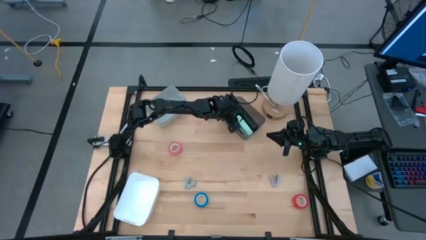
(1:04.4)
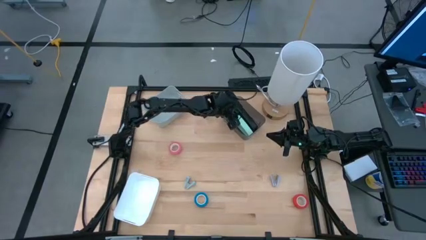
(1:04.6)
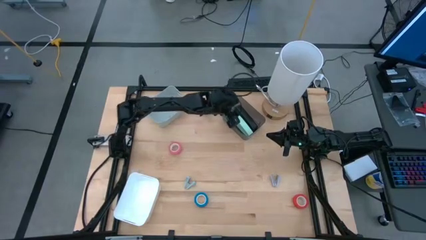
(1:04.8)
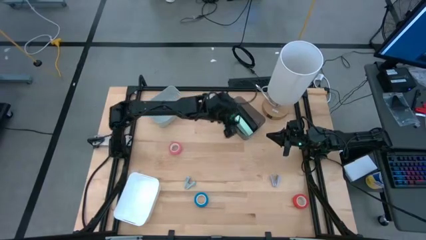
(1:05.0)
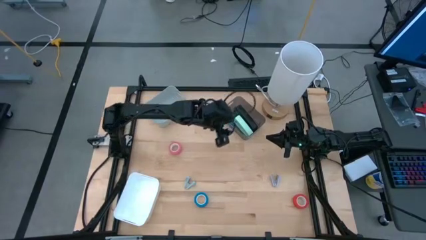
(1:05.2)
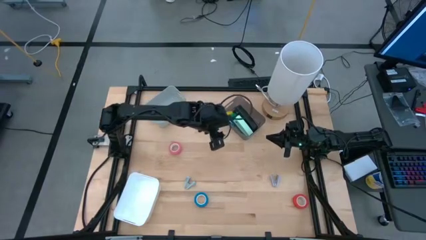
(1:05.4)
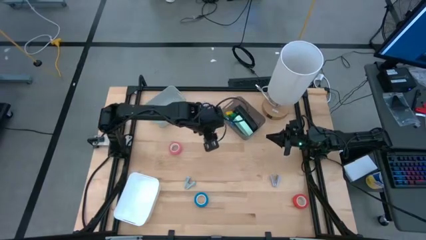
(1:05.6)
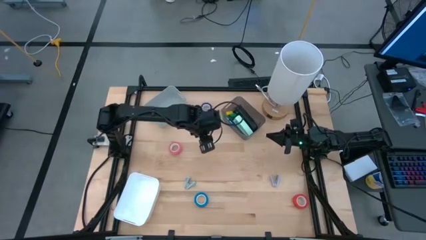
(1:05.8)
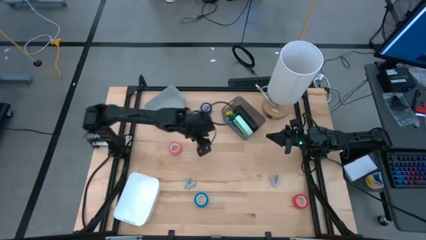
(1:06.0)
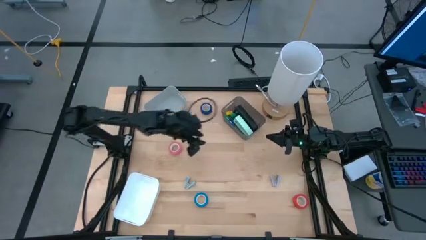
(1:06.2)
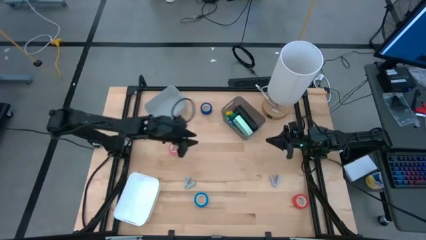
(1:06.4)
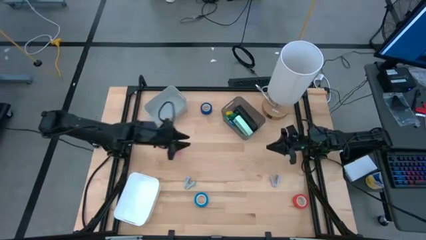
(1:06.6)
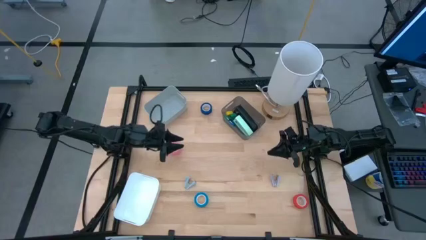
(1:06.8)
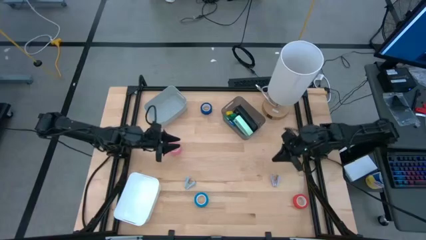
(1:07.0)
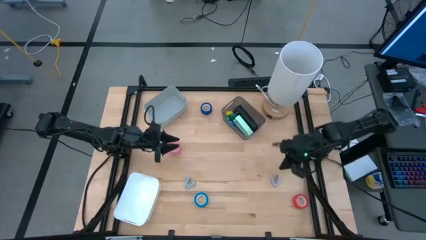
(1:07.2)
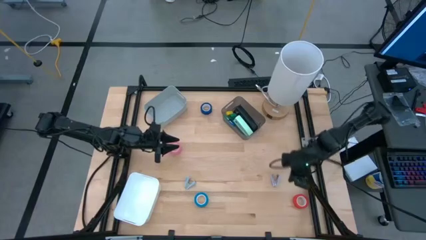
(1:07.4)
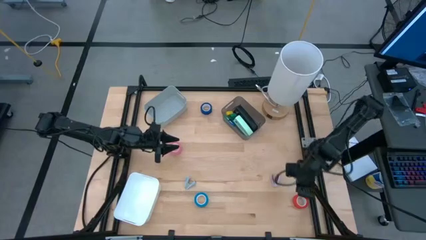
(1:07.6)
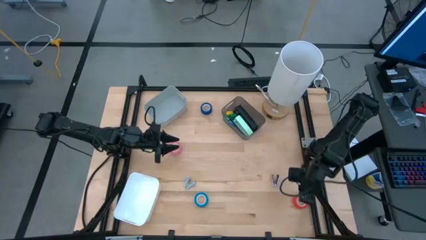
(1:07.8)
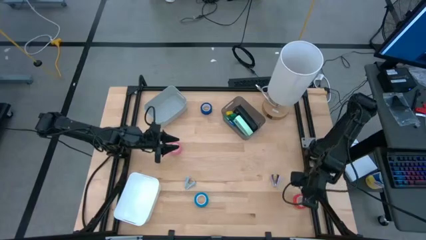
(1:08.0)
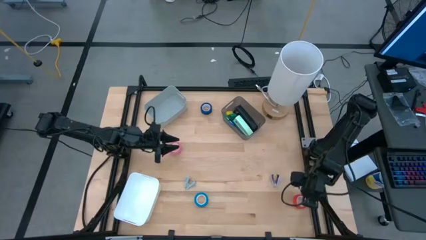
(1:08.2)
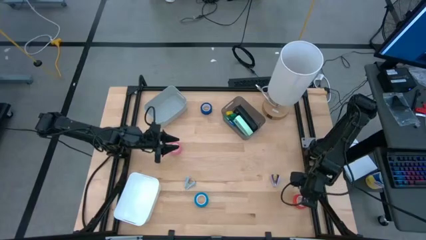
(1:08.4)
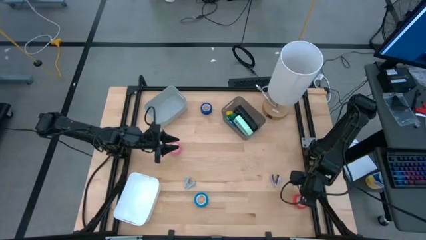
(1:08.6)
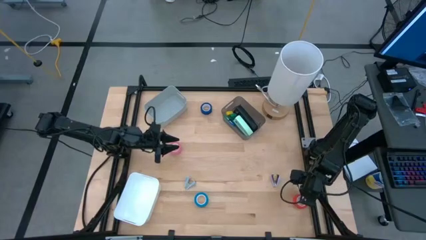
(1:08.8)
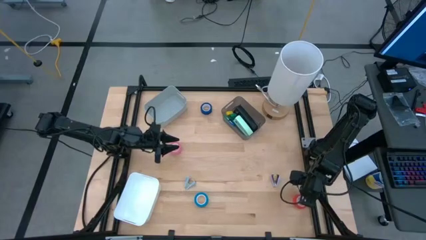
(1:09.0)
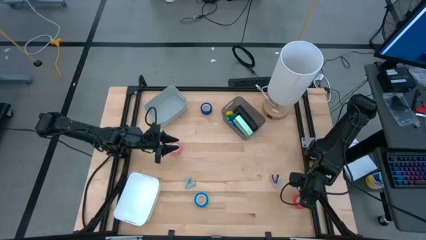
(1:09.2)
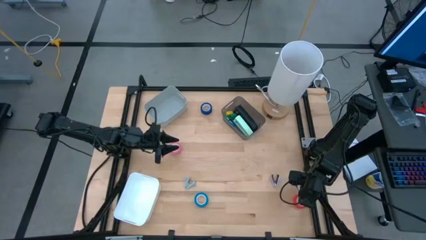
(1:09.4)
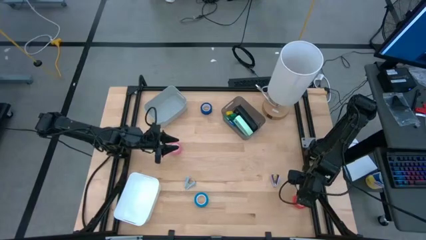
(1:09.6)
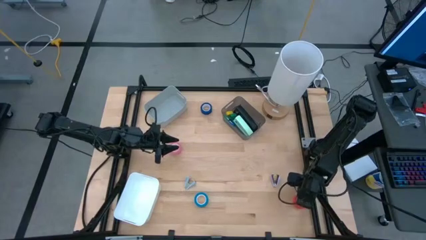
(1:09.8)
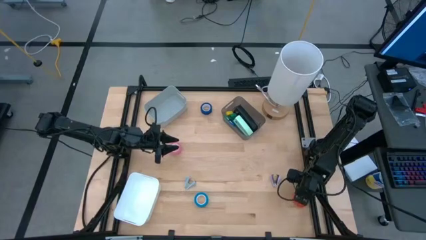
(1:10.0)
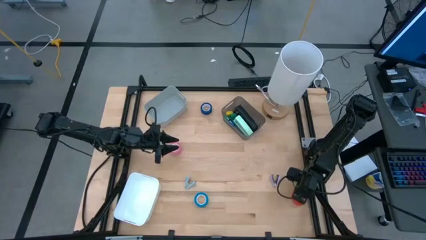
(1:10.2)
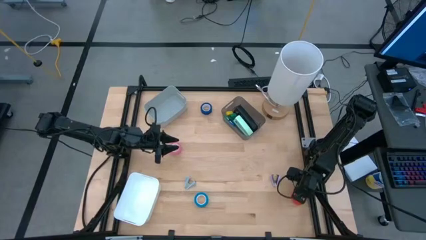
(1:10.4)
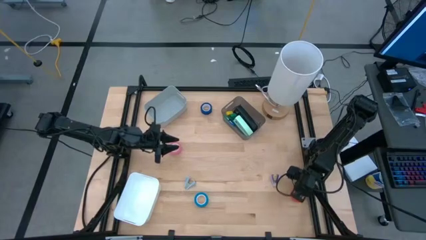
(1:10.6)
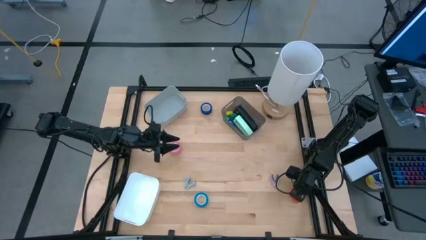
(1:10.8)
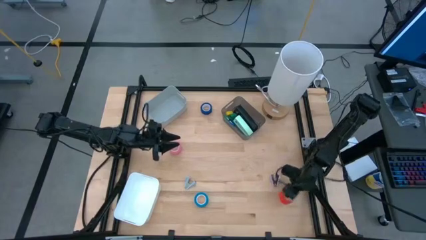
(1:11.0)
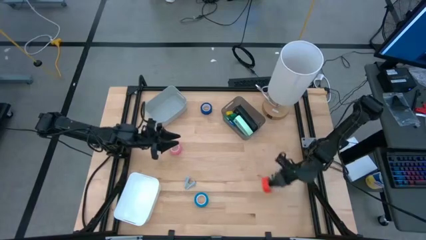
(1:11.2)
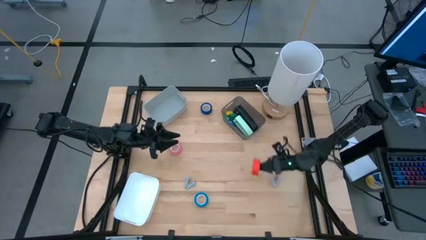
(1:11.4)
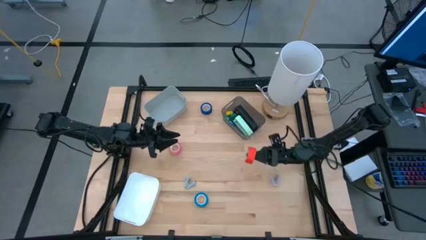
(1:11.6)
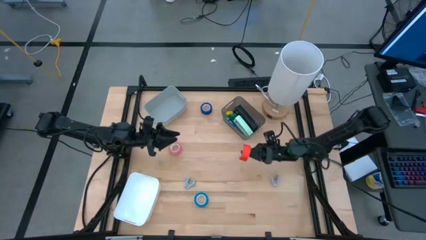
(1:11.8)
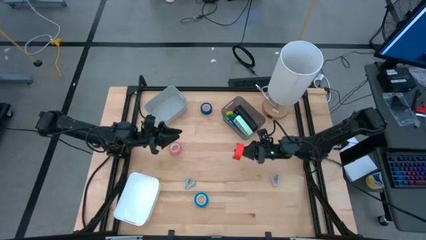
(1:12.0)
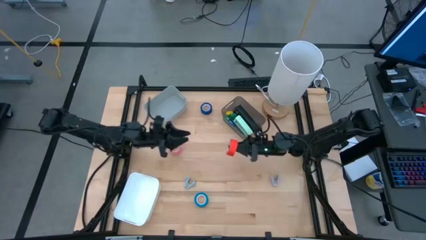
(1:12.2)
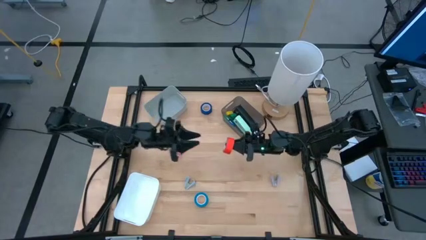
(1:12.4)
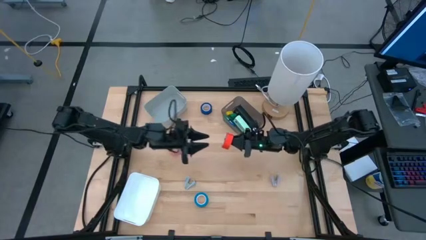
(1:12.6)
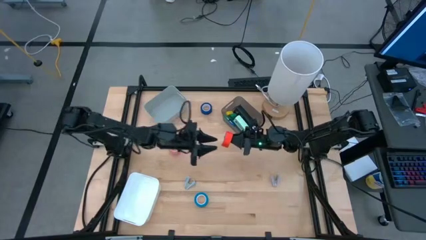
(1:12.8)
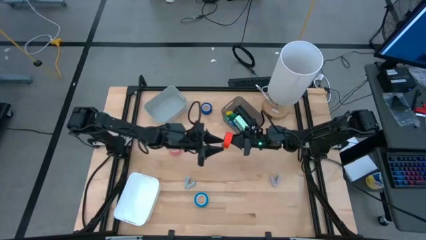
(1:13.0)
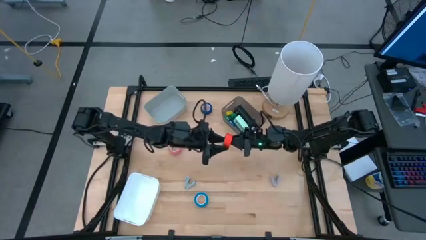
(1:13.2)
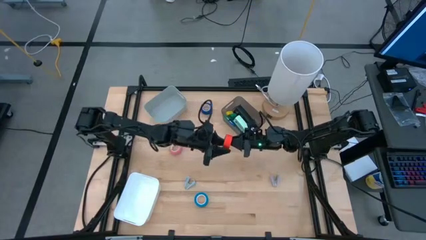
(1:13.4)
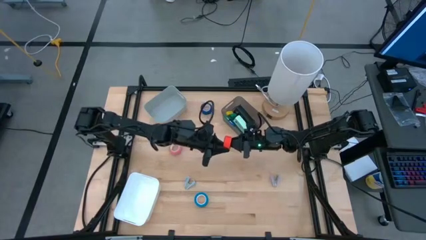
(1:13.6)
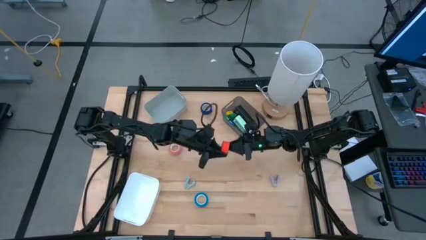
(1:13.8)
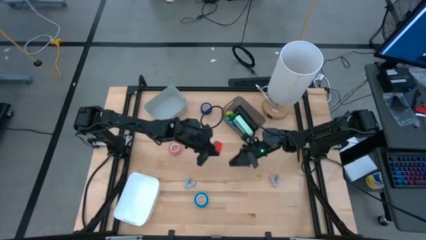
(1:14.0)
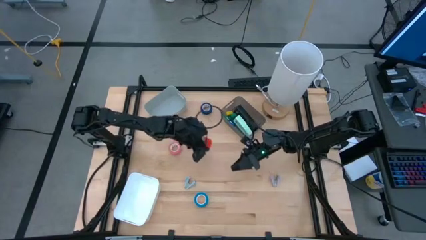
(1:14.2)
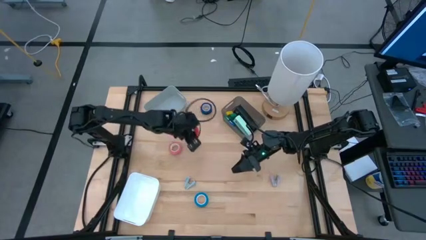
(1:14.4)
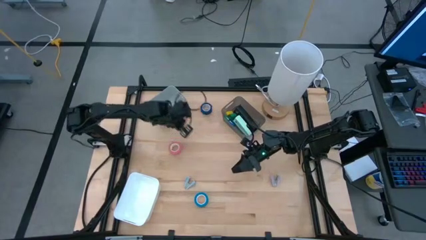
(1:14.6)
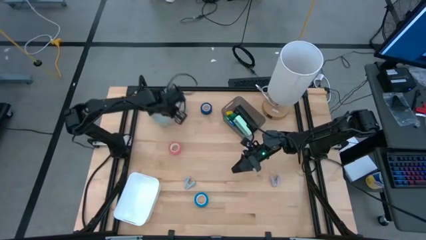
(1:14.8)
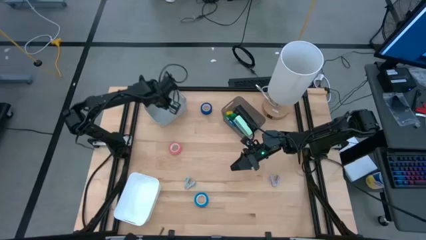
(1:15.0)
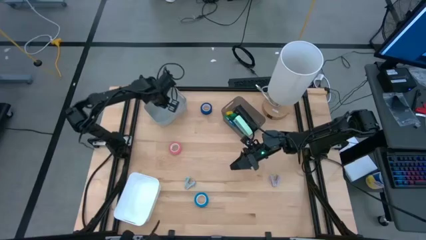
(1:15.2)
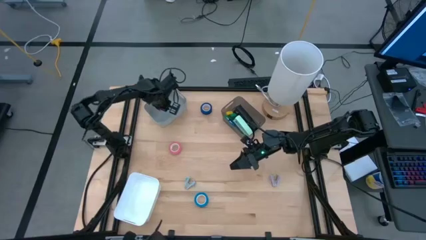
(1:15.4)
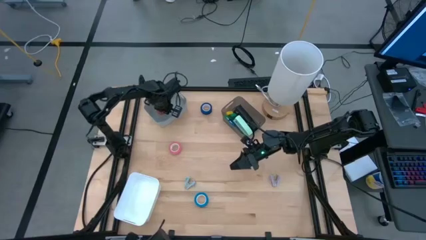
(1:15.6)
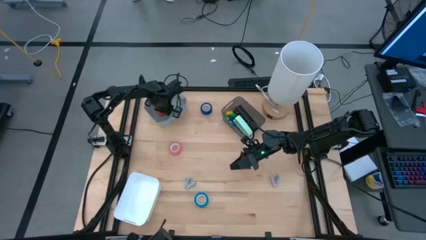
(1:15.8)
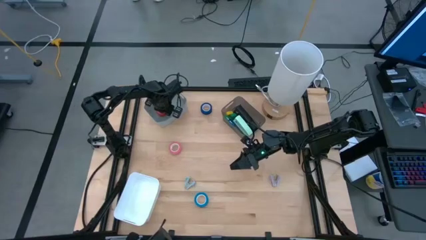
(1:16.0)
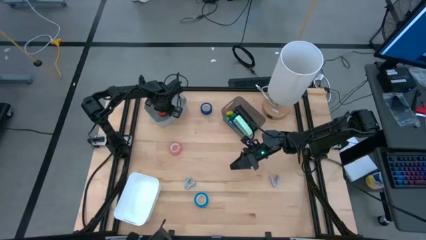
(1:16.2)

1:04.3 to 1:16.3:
Task: Pick and place Stapler, Stapler remover, tape
Put the orange tape into the gray bin

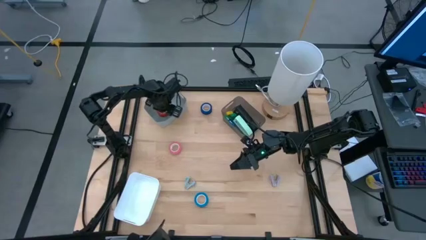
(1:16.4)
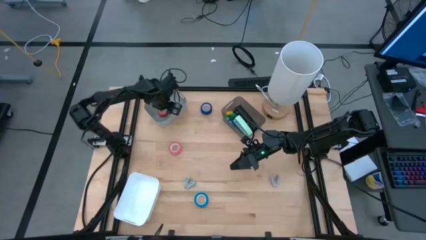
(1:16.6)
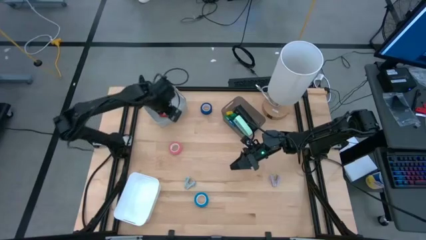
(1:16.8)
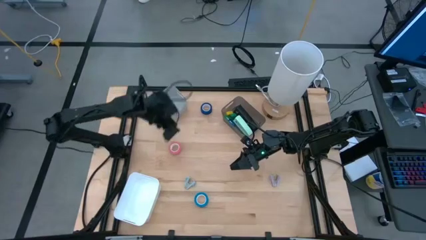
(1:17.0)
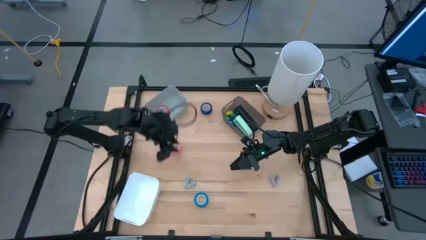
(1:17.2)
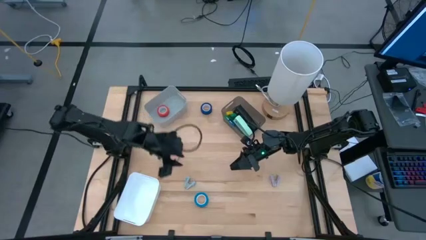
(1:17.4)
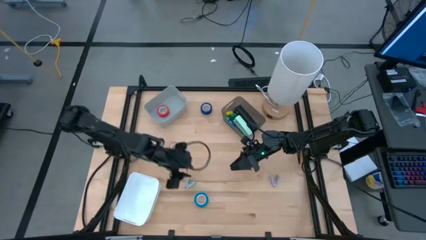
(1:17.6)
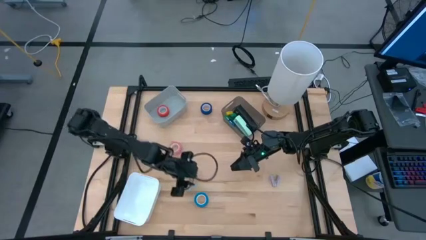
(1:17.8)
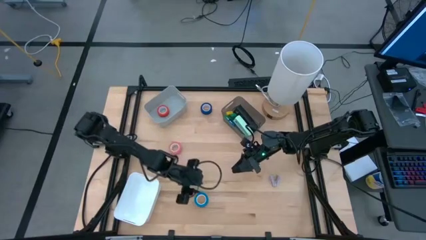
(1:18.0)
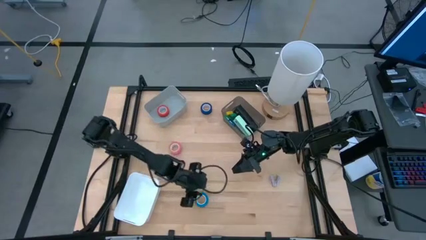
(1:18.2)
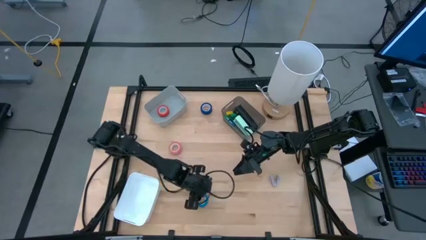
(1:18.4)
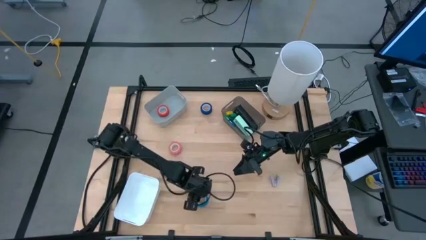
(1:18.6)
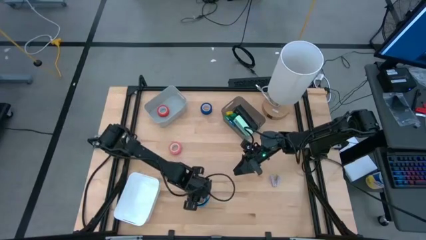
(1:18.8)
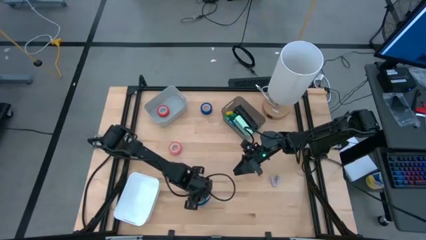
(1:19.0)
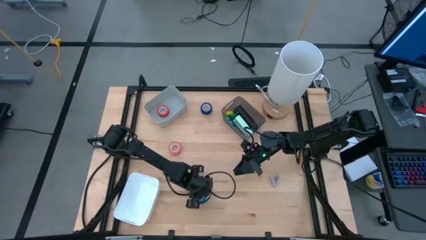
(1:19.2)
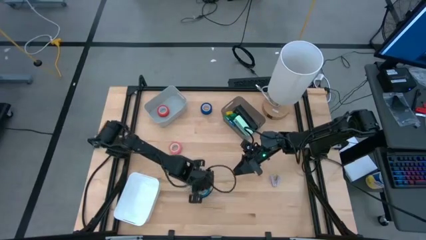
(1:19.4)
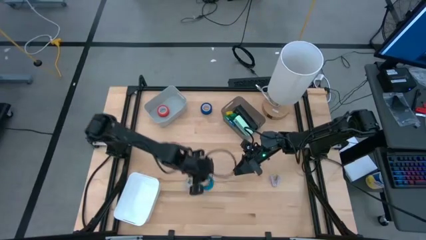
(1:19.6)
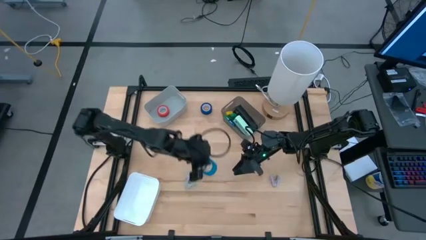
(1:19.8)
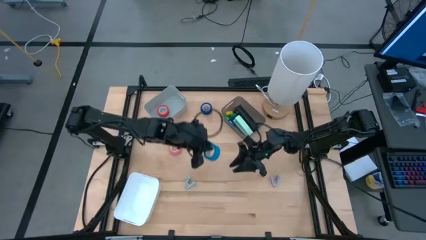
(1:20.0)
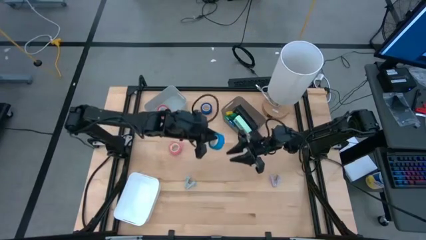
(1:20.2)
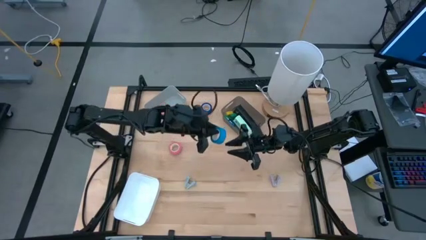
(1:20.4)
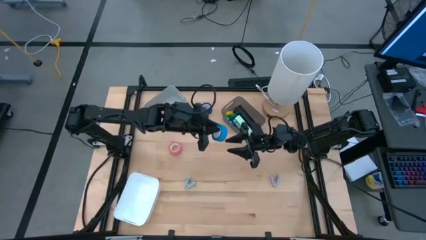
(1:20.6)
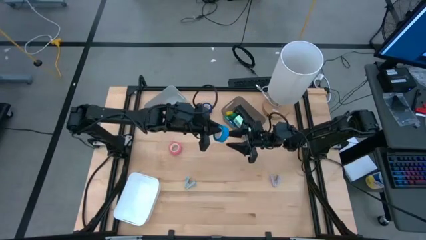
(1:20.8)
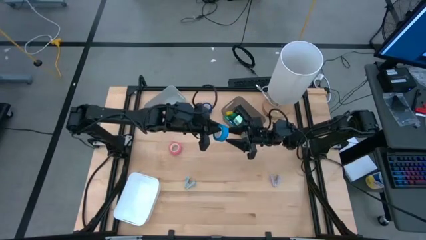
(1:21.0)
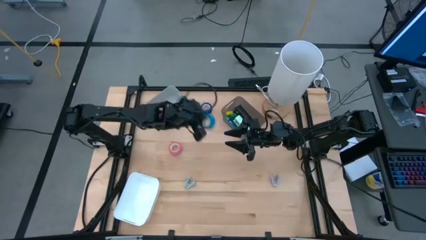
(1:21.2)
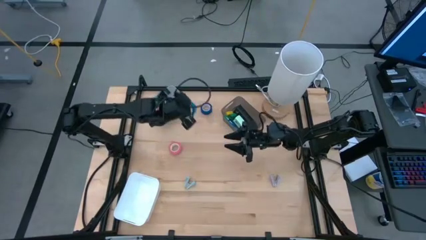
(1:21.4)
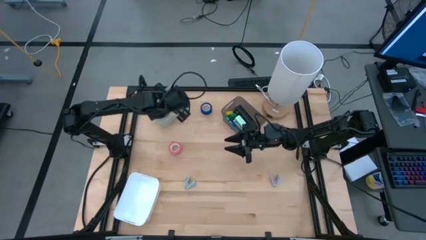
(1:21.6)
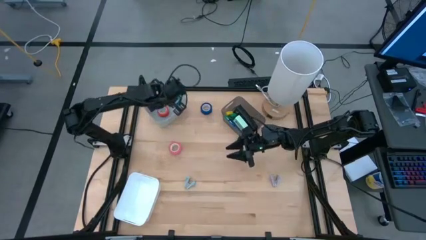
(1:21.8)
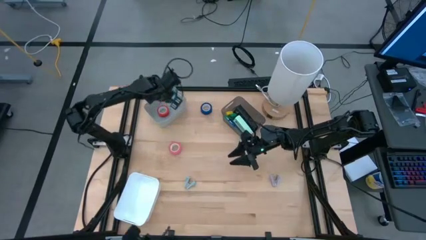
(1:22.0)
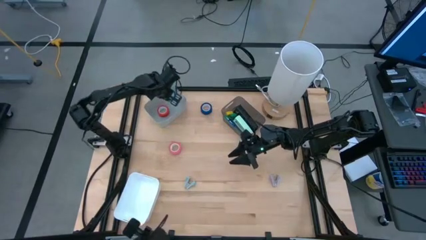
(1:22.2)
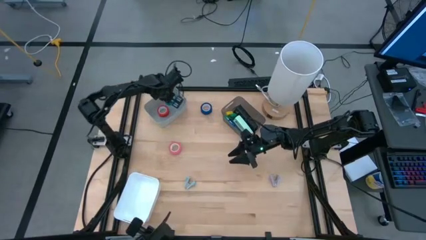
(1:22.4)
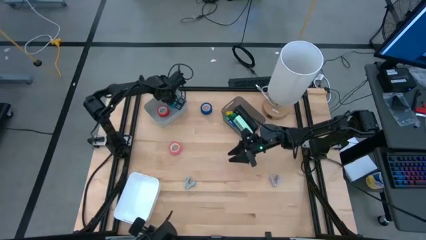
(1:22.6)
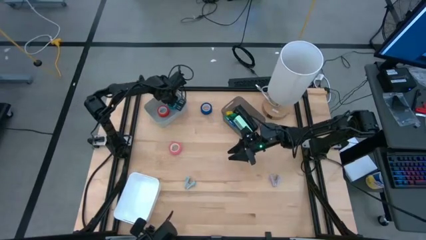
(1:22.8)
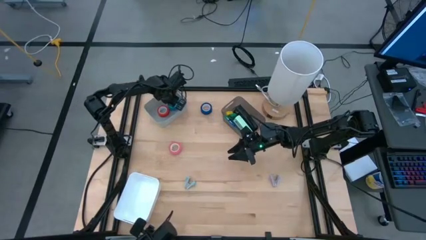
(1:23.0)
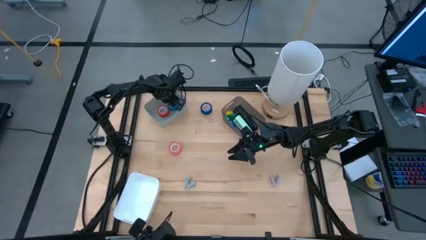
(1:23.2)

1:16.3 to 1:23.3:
Put the light blue tape into the gray bin
